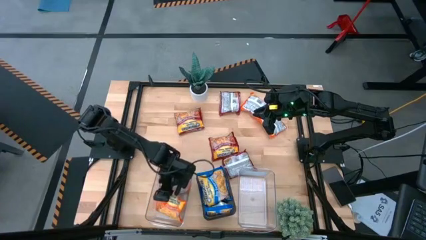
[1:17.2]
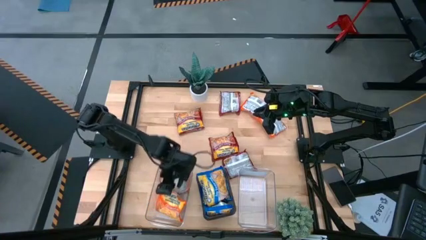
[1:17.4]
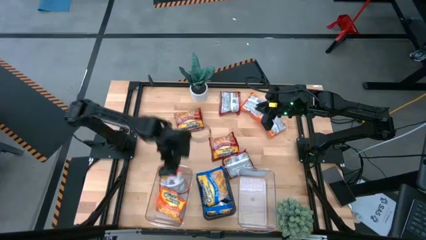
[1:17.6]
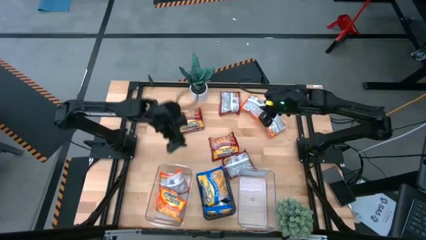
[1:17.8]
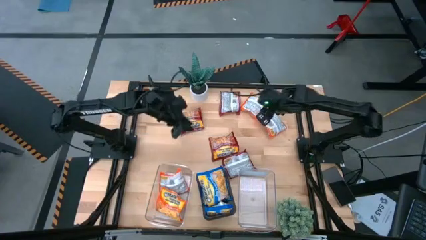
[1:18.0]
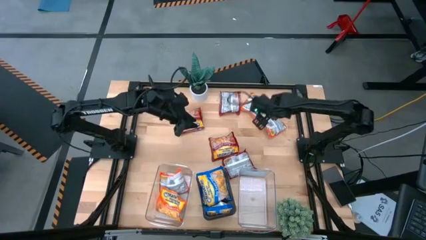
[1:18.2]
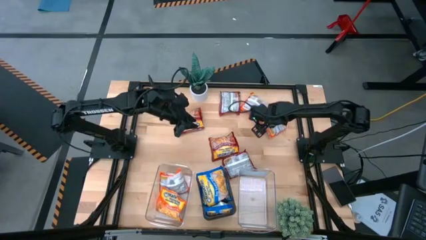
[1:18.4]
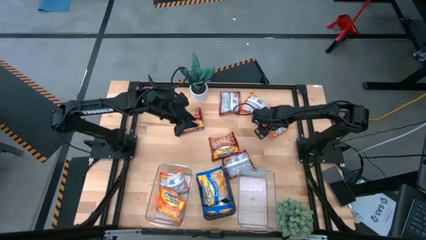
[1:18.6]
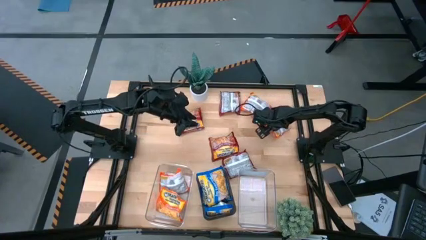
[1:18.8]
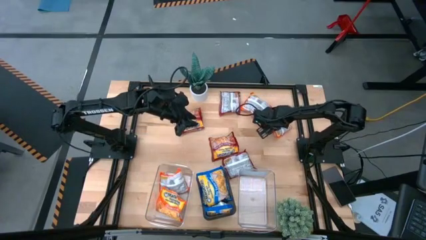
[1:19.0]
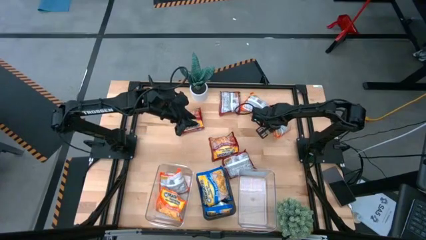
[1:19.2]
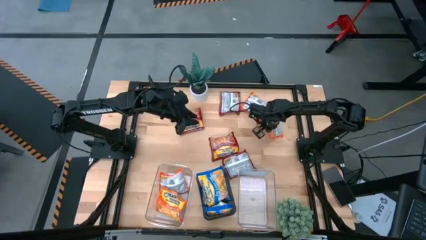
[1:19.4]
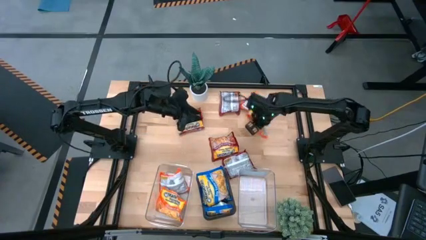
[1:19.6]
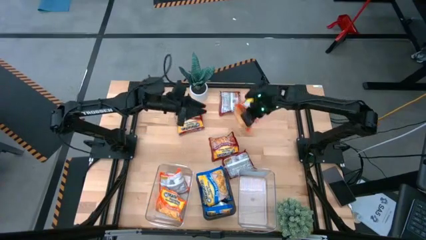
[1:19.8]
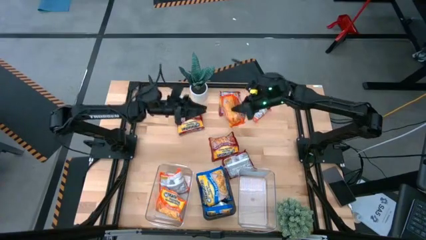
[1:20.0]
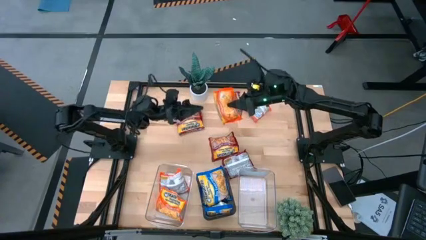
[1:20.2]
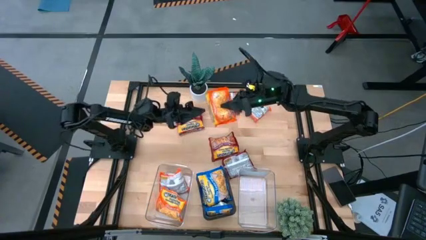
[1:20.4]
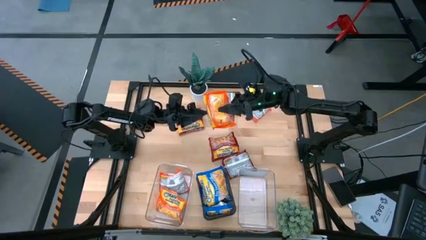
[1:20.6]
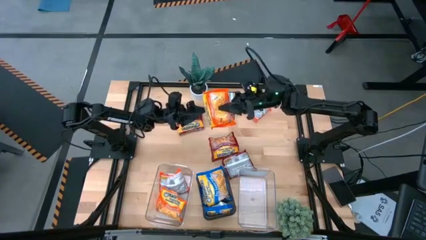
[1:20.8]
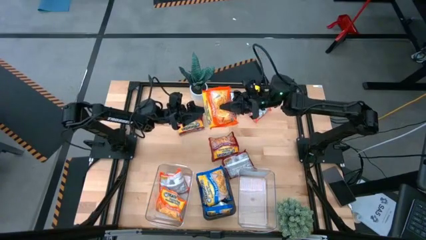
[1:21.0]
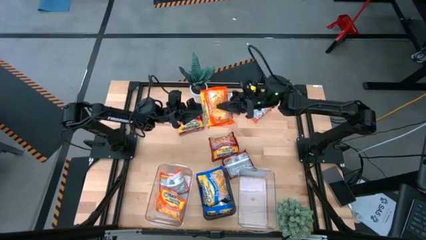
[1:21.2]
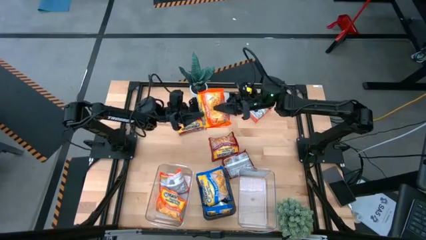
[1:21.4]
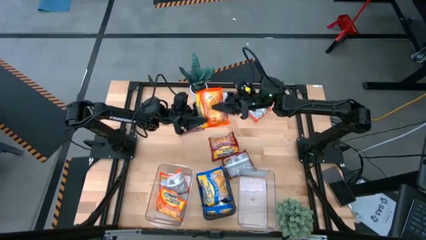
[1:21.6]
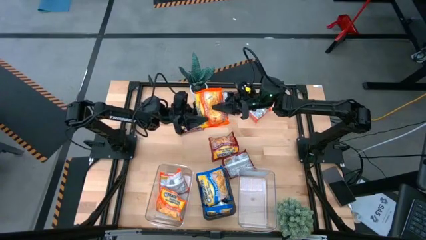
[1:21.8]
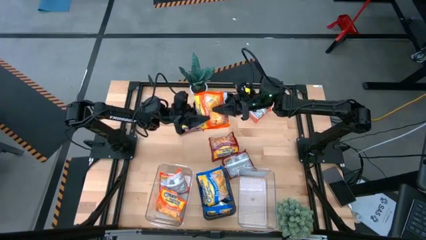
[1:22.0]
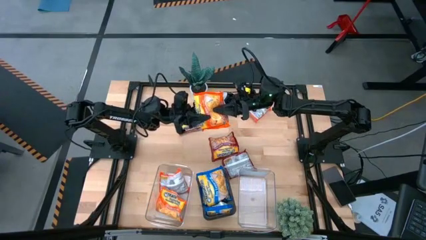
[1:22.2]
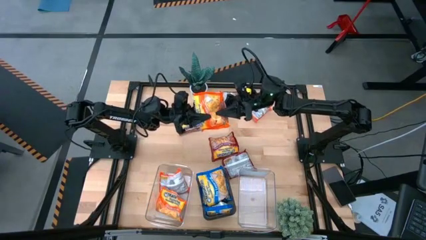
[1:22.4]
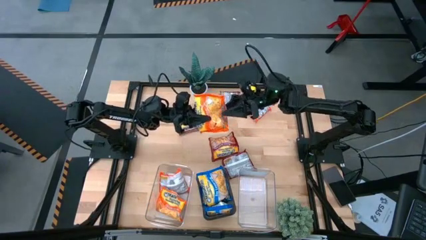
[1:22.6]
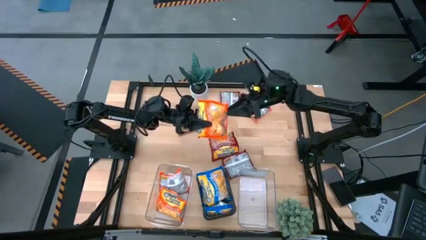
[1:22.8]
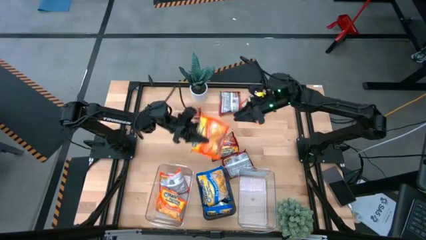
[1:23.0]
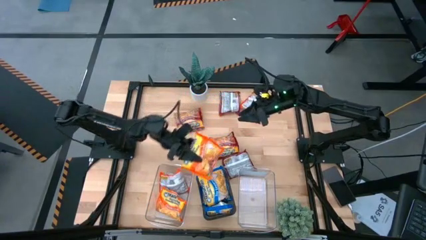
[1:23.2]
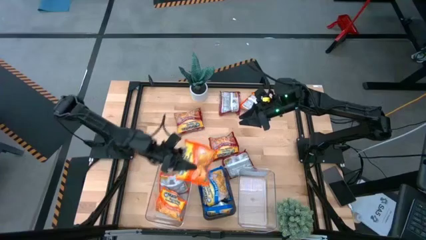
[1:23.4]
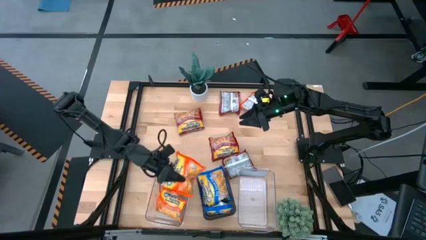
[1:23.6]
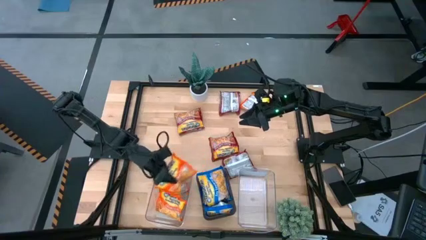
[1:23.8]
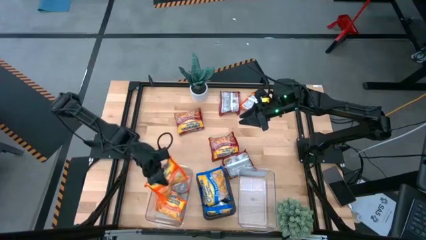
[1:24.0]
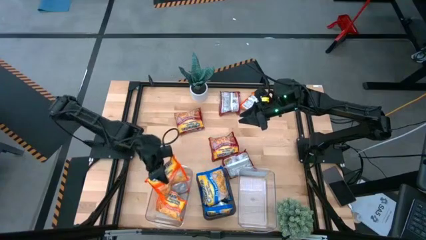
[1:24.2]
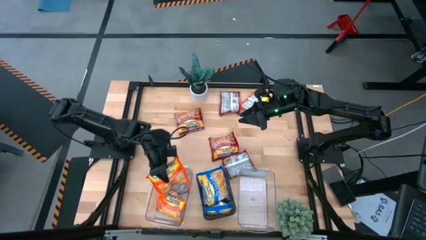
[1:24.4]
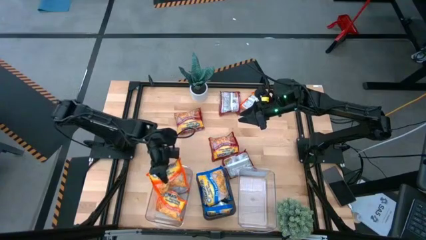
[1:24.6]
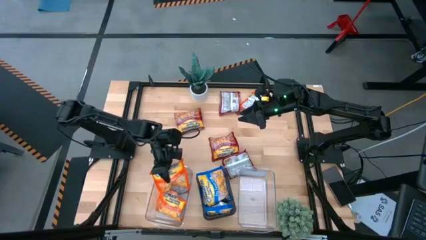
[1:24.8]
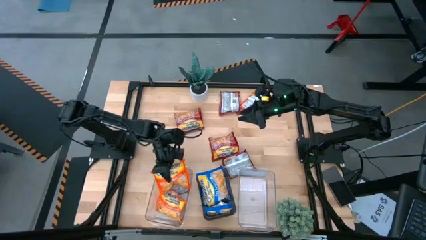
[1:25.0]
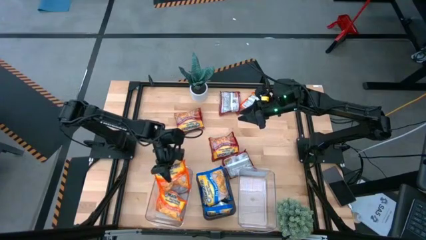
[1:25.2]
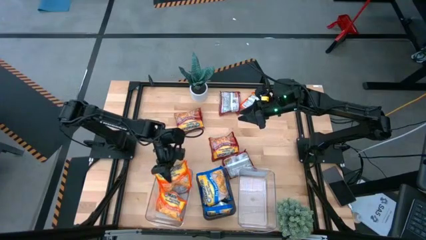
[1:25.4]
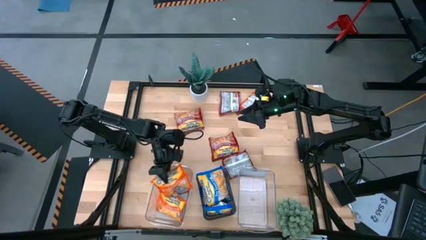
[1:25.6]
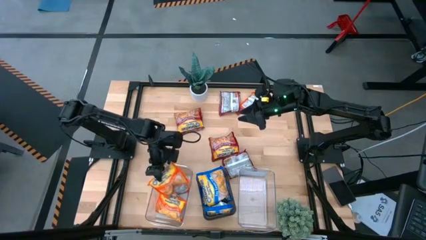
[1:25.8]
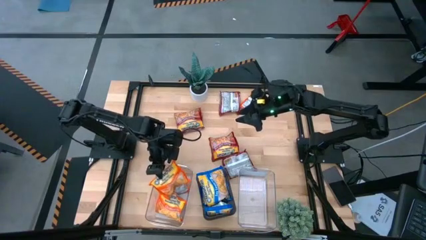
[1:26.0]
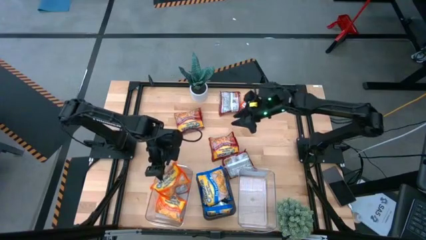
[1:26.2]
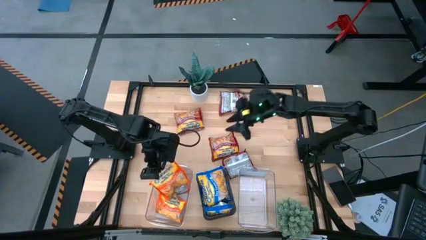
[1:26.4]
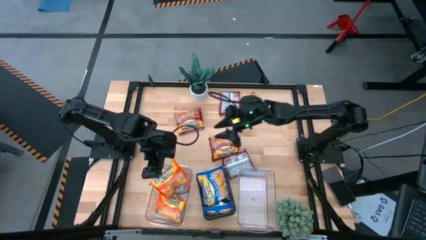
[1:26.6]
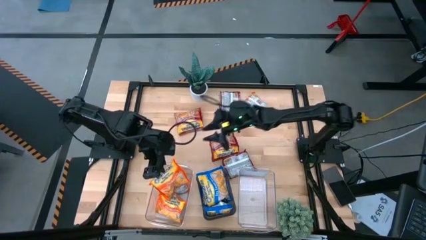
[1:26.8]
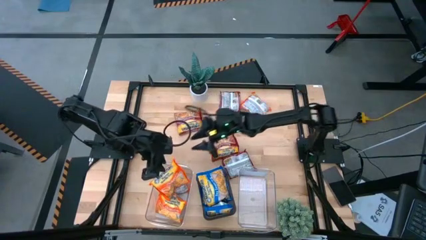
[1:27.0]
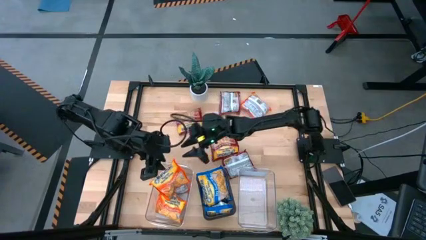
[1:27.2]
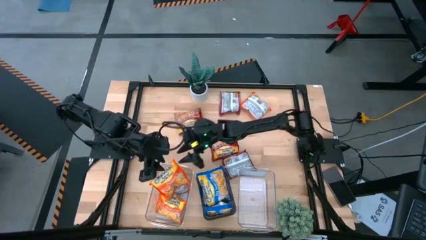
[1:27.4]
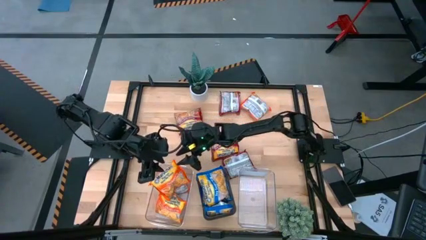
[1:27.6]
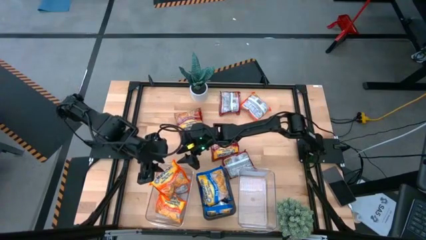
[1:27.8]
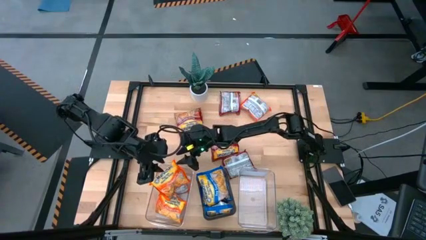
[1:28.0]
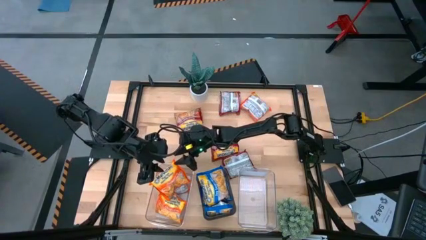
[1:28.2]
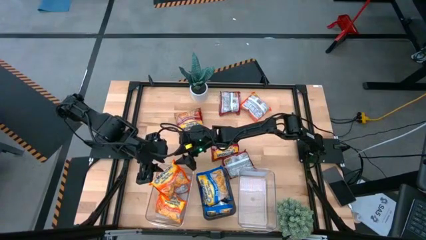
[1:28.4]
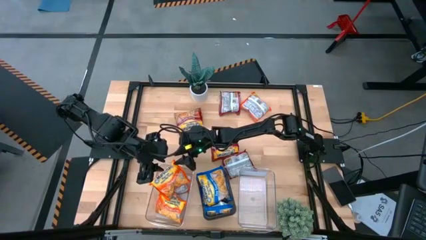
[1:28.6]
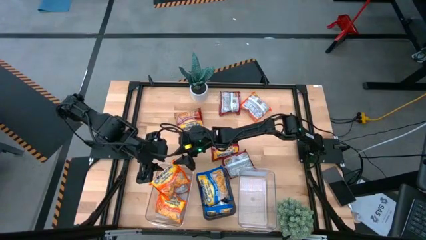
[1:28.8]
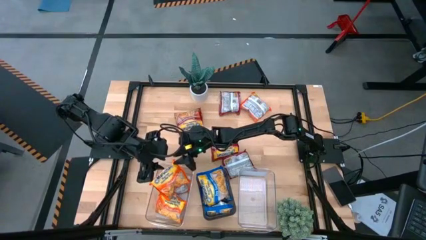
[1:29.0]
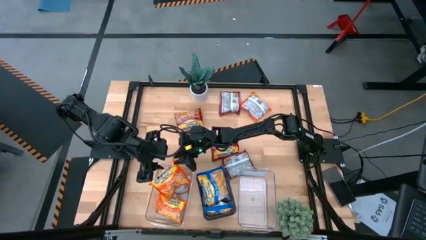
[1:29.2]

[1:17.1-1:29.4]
Task: Sort Maruchan noodles
Put the orange noodle pack into the left transparent bin

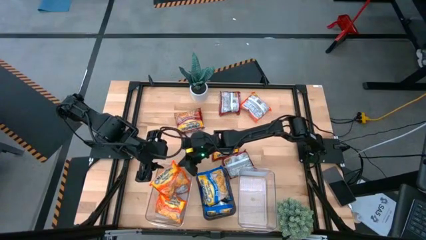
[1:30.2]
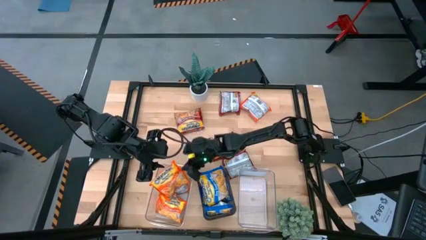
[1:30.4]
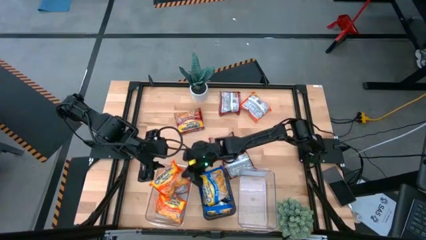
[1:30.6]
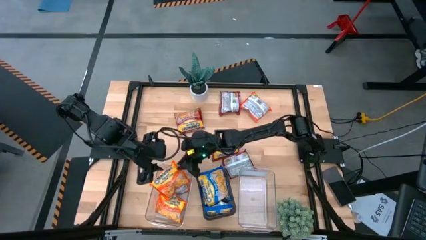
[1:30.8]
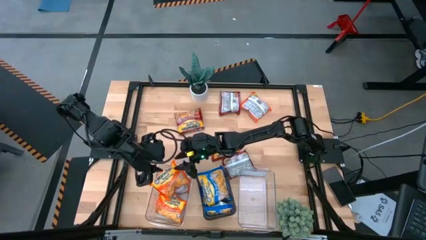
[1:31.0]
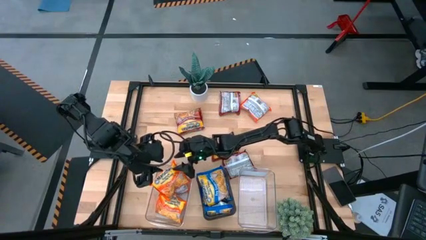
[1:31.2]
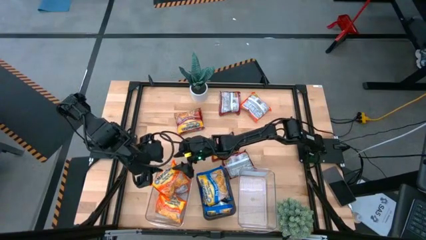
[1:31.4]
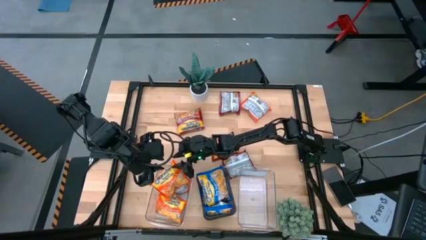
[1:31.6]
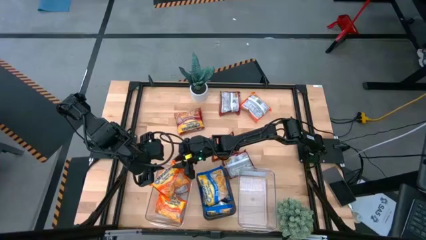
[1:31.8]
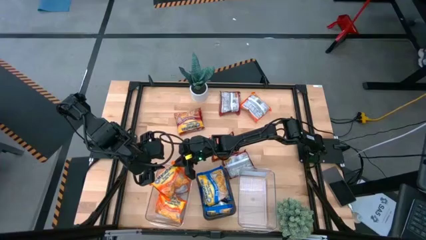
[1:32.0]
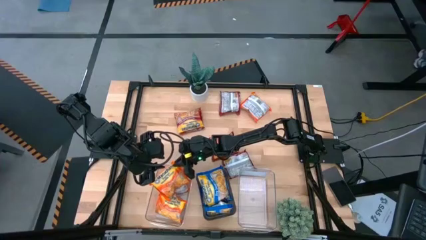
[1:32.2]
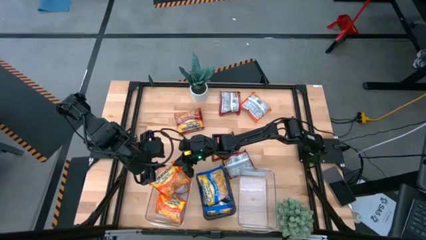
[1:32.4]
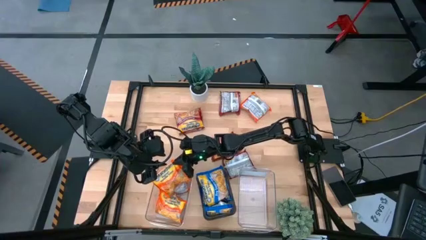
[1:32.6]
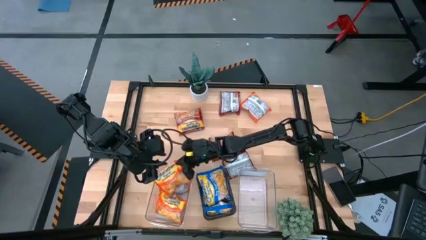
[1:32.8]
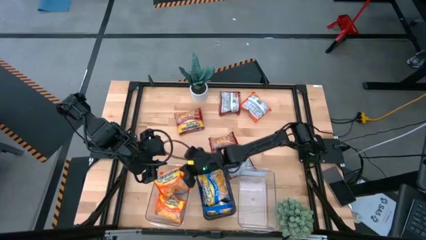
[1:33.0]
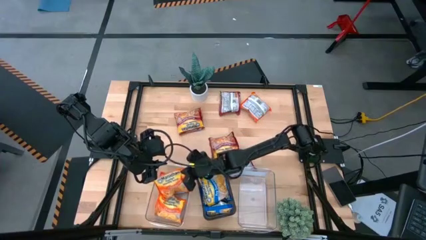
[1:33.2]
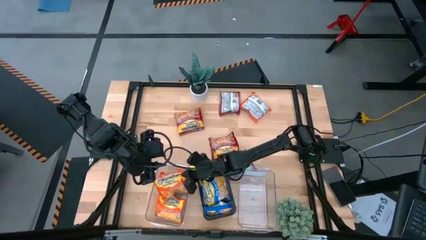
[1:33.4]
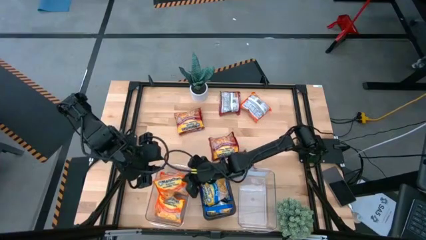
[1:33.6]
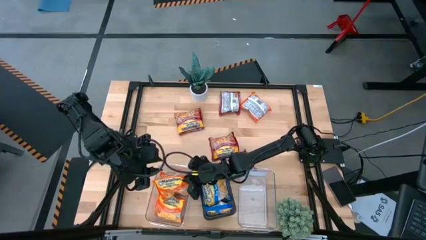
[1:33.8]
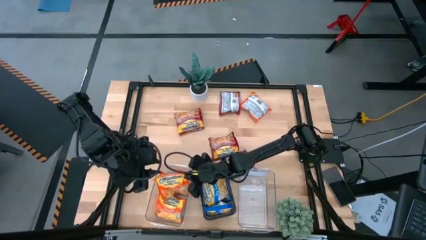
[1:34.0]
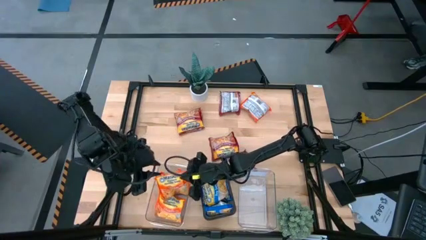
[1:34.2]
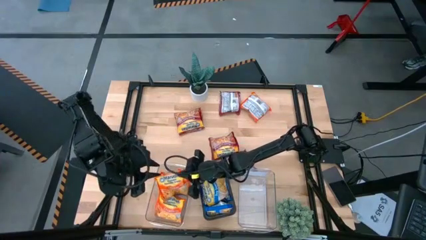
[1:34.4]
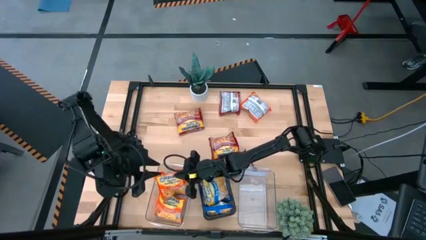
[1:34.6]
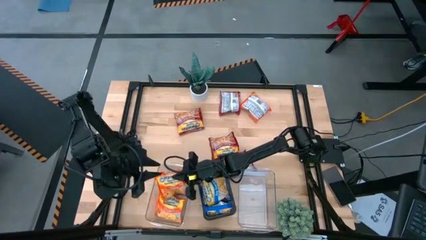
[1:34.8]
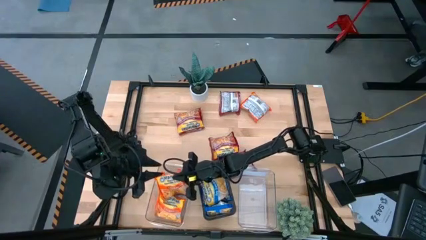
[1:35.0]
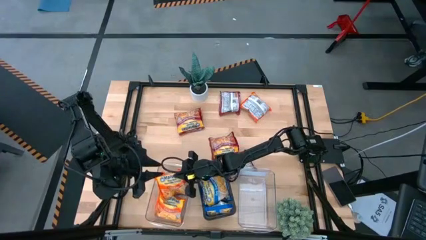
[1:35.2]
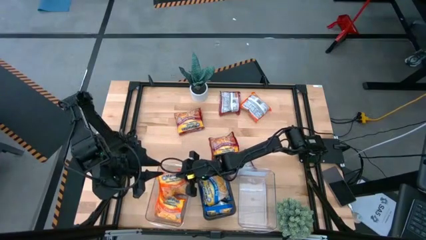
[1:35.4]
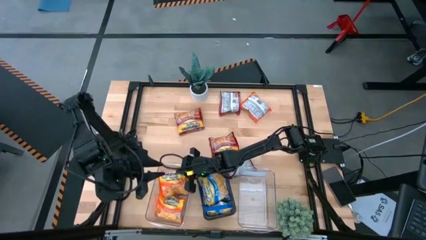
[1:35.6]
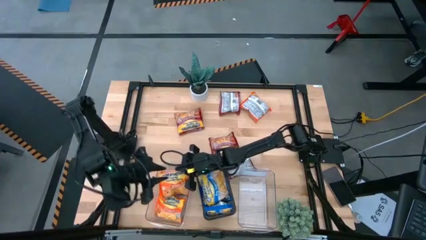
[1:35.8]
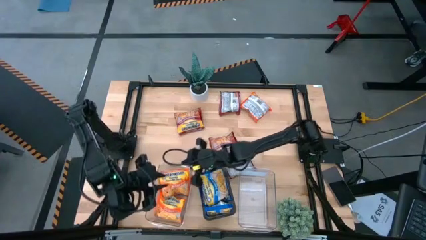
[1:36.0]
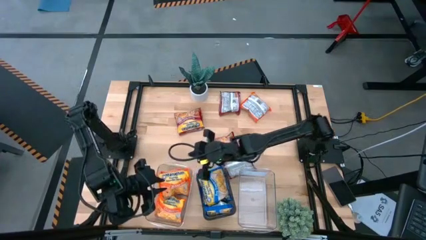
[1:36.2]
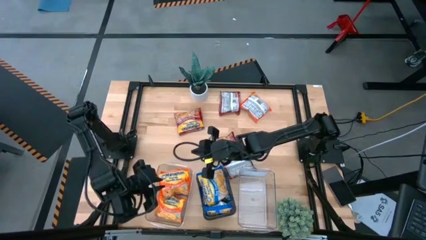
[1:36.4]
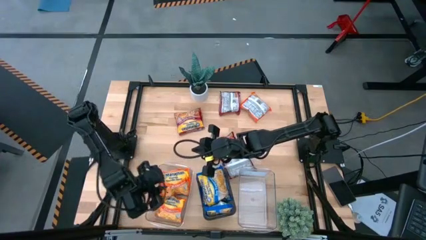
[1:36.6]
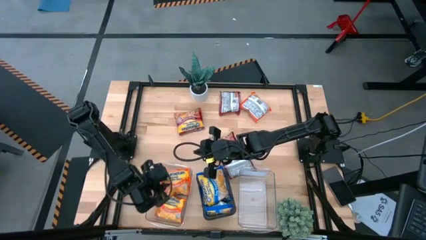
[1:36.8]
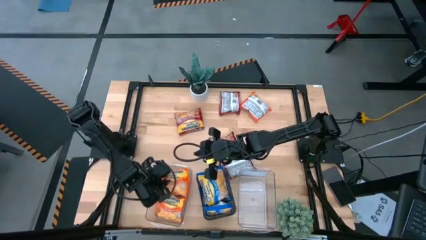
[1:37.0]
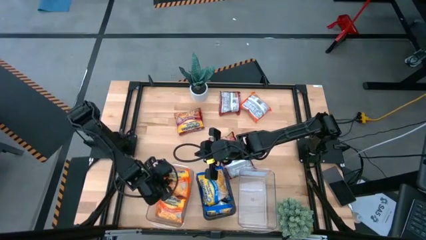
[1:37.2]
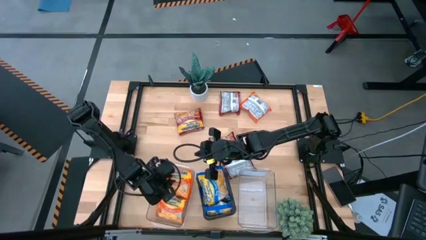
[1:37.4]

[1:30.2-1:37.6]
Put the orange noodle pack into the left transparent bin
